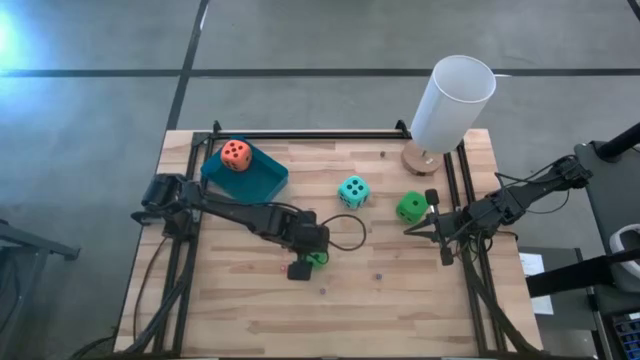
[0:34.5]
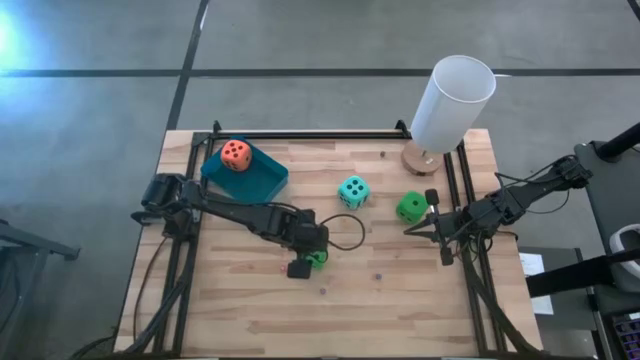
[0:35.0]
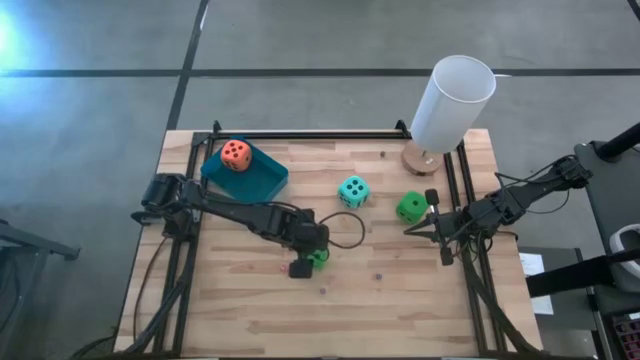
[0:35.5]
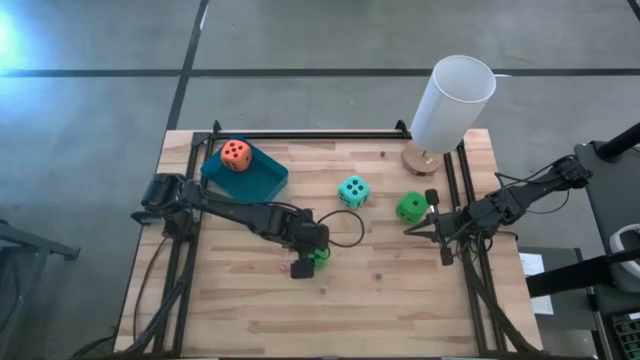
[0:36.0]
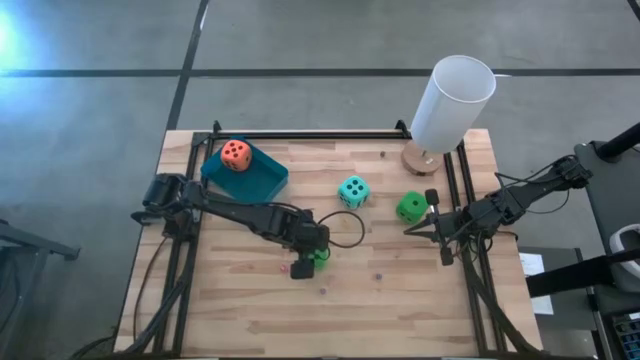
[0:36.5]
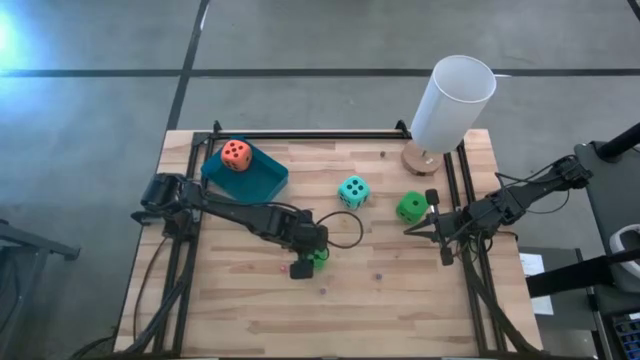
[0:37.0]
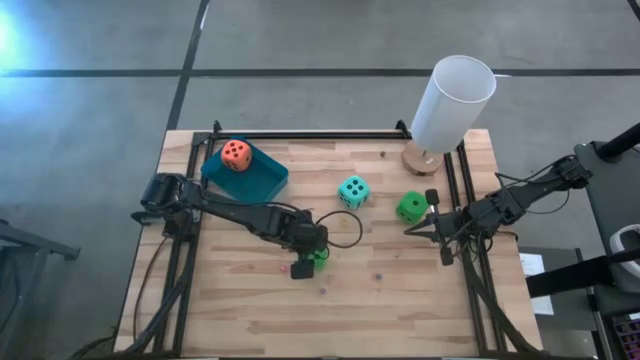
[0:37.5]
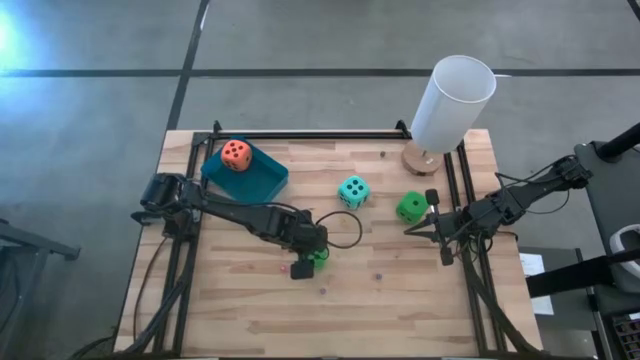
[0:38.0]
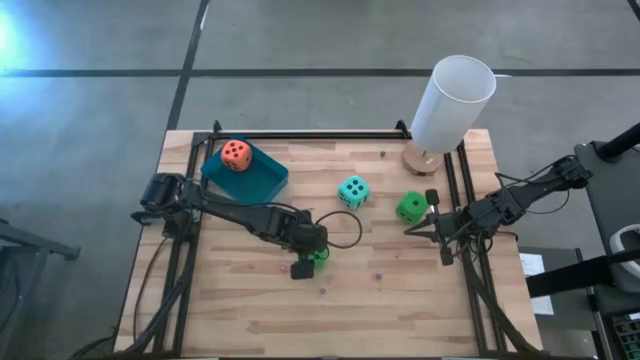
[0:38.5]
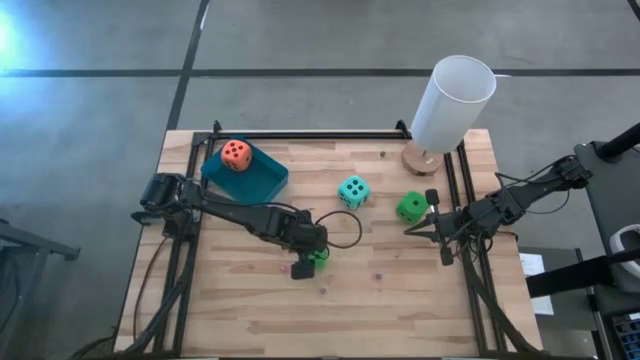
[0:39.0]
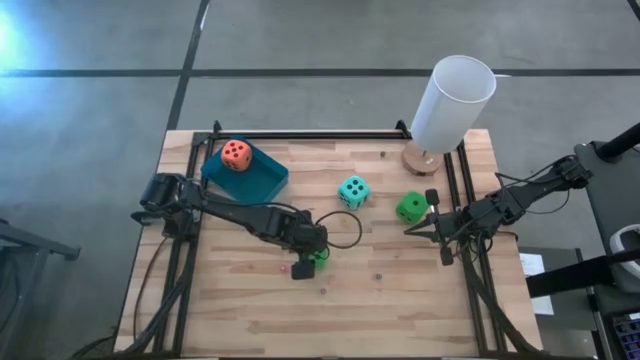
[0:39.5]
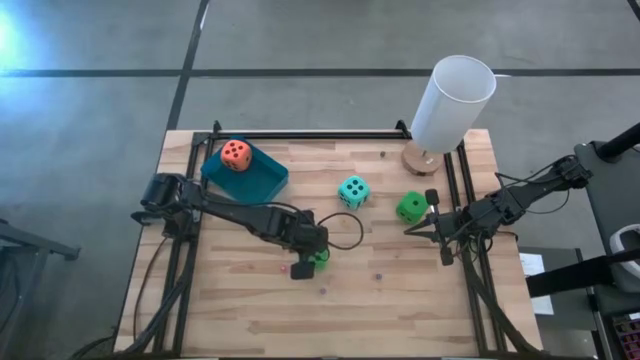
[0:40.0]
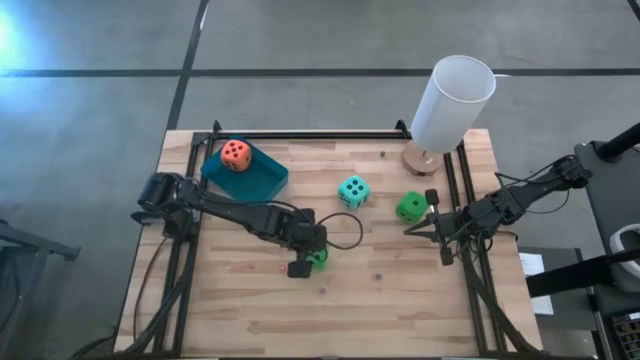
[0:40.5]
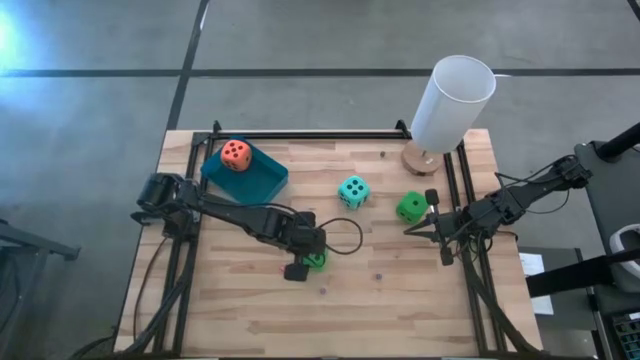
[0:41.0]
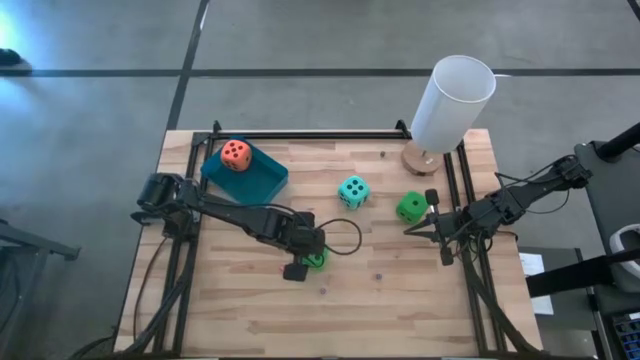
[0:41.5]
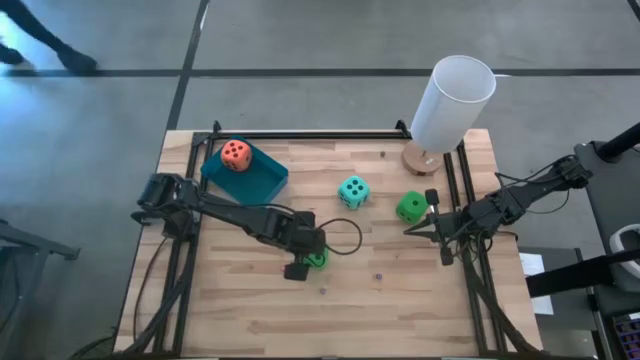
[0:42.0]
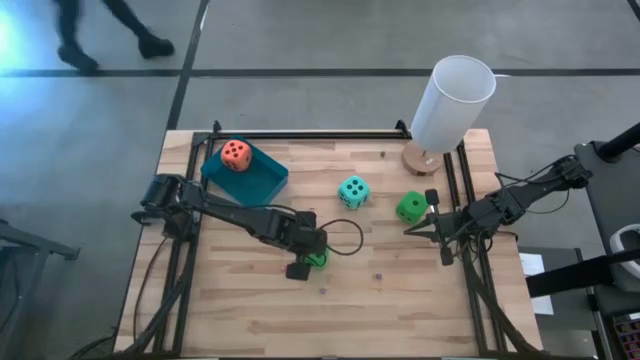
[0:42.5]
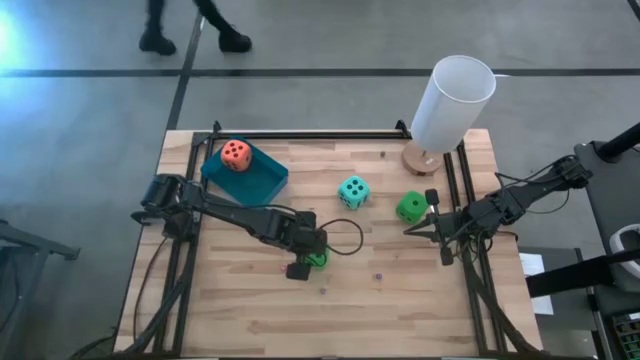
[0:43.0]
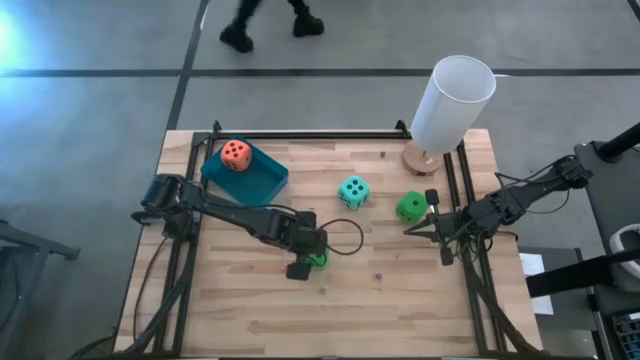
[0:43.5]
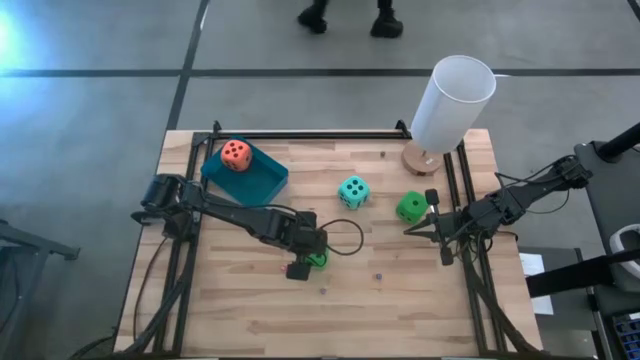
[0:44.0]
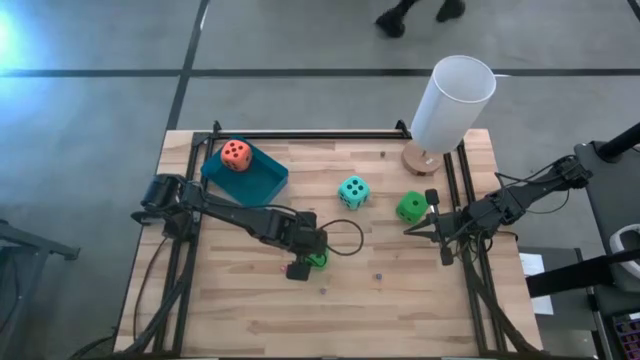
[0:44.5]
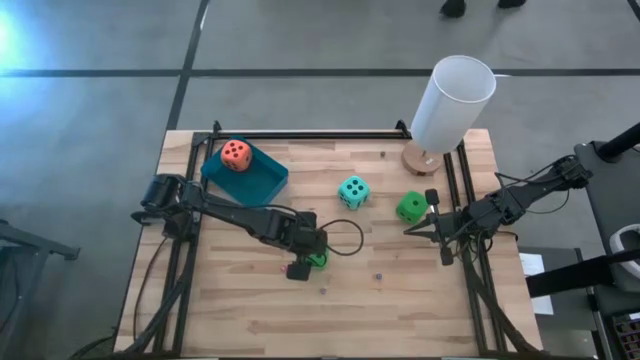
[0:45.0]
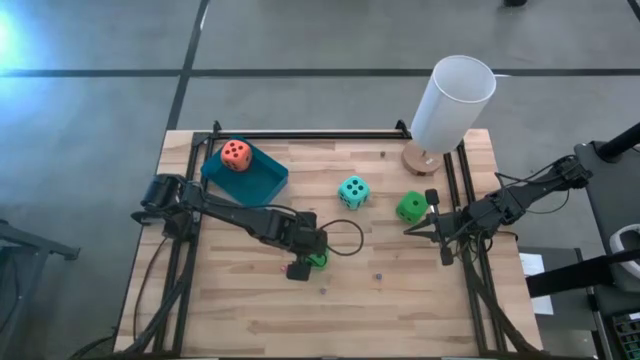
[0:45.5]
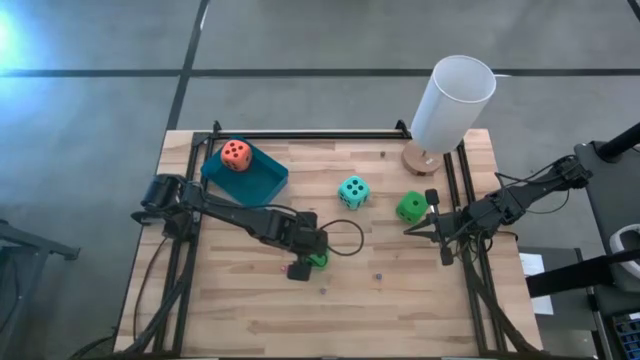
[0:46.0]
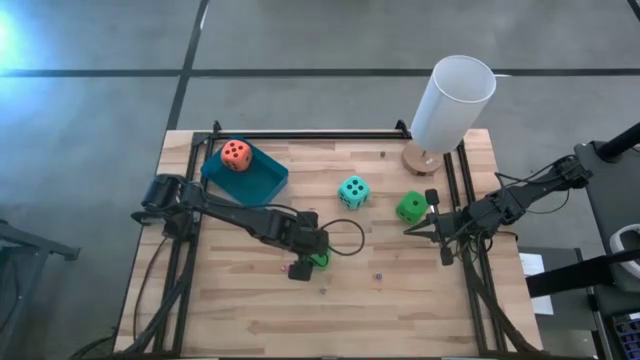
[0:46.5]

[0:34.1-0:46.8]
Task: Pick & Place Dice
Put the big green dice on the left into the blue bin

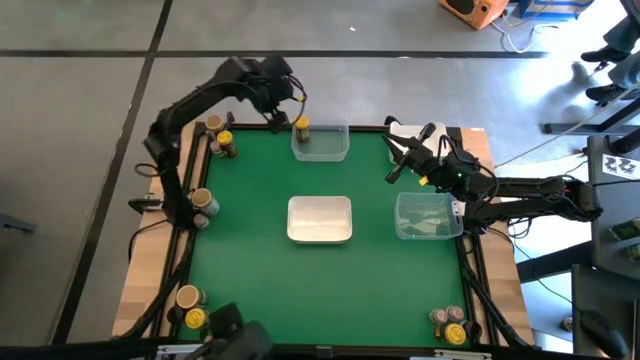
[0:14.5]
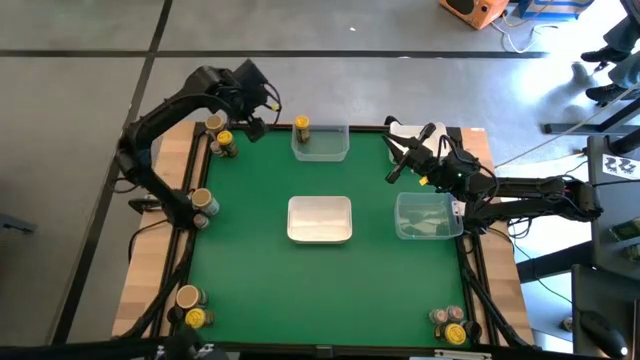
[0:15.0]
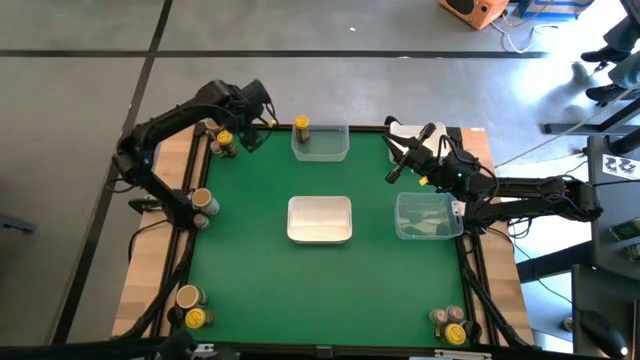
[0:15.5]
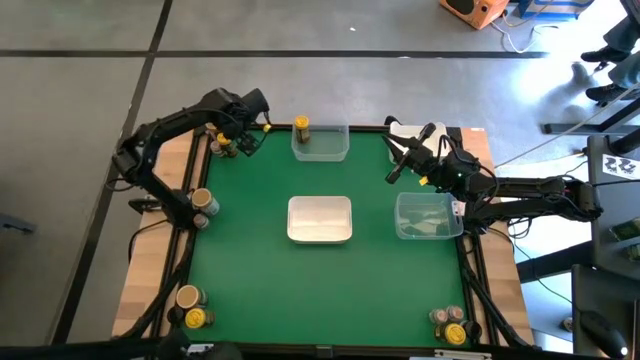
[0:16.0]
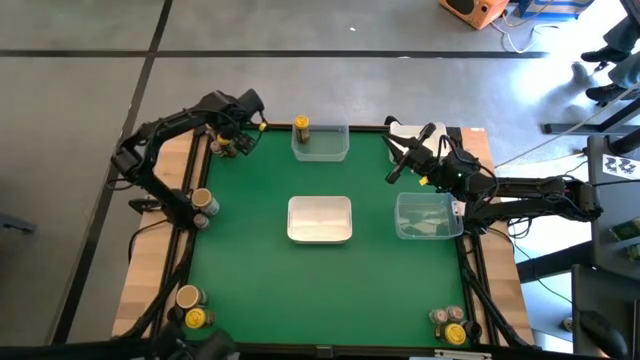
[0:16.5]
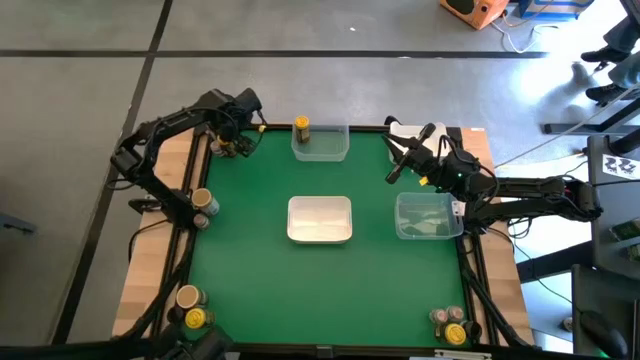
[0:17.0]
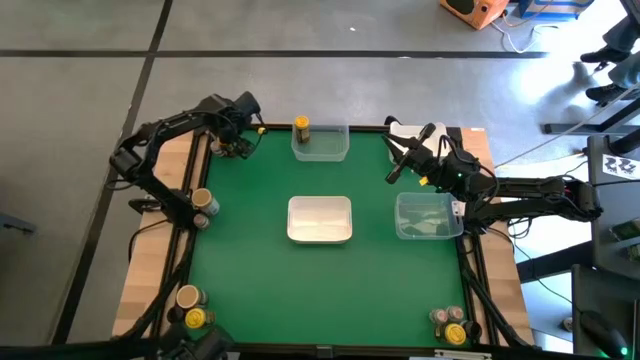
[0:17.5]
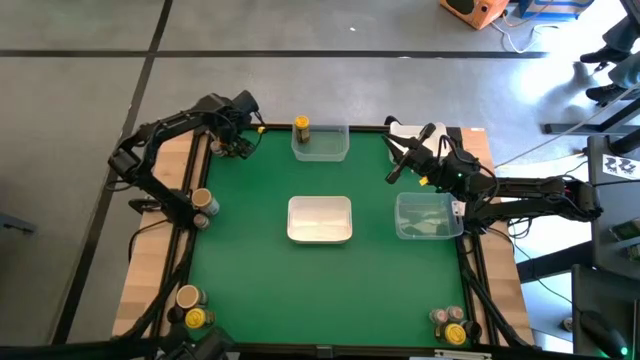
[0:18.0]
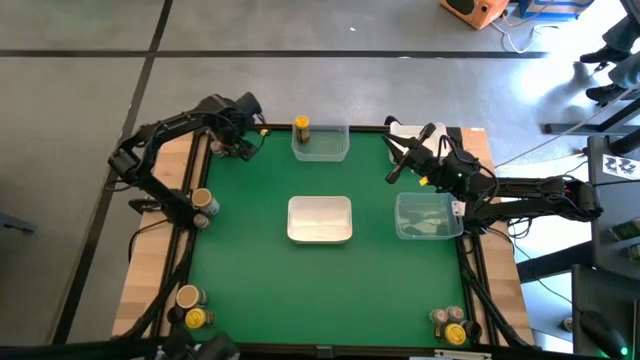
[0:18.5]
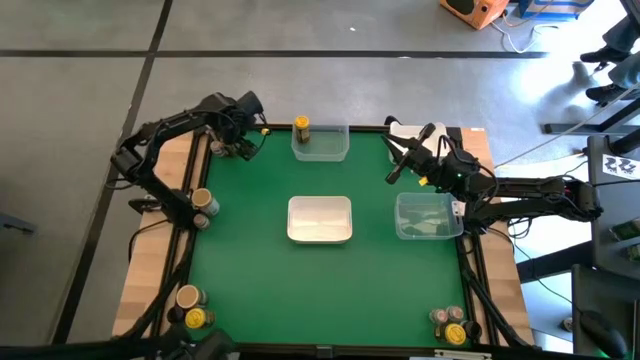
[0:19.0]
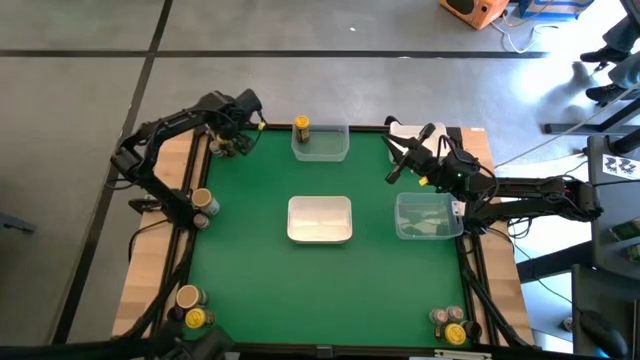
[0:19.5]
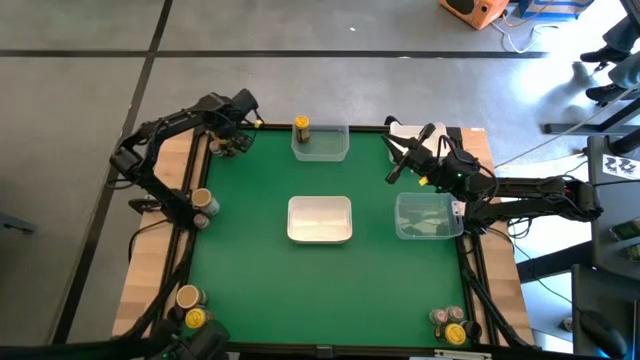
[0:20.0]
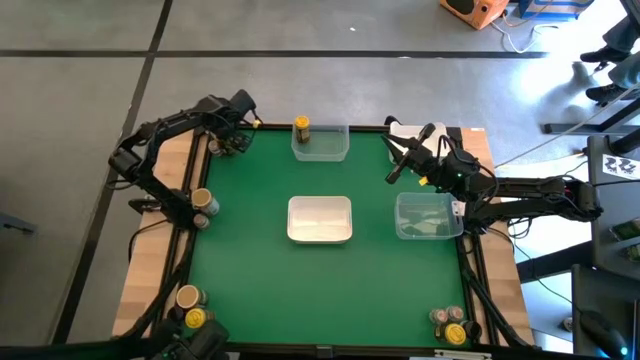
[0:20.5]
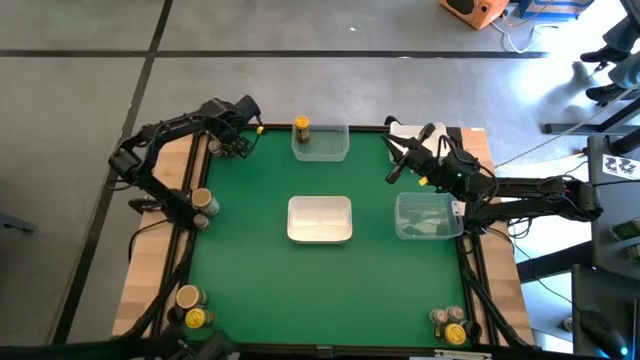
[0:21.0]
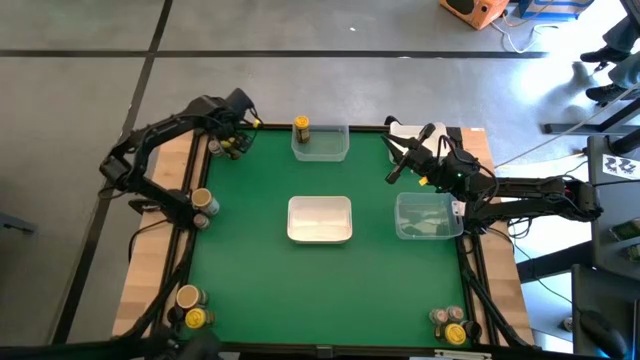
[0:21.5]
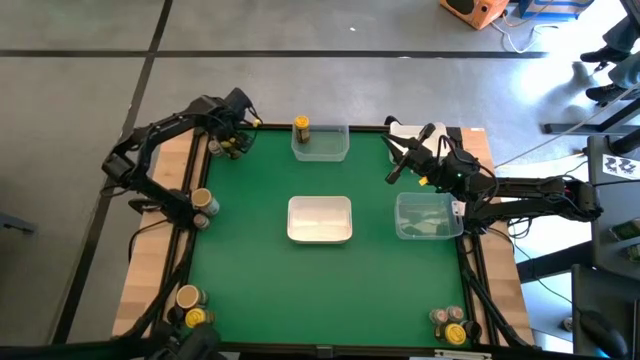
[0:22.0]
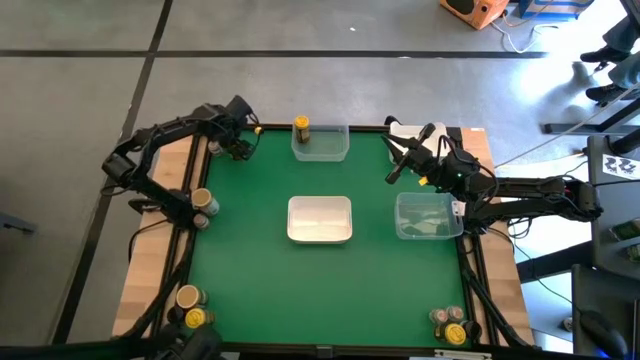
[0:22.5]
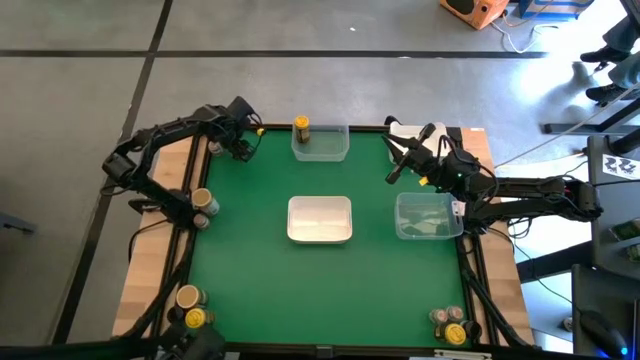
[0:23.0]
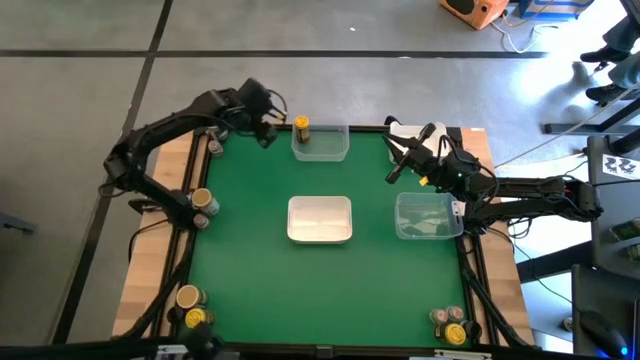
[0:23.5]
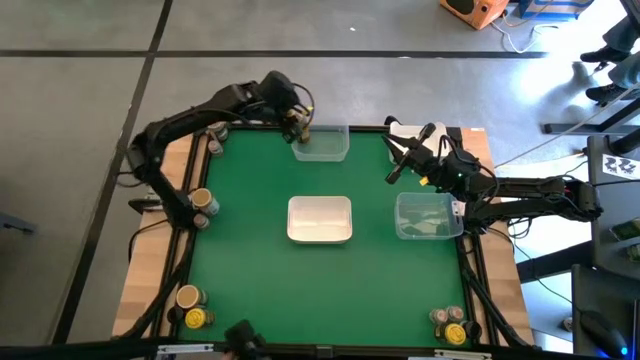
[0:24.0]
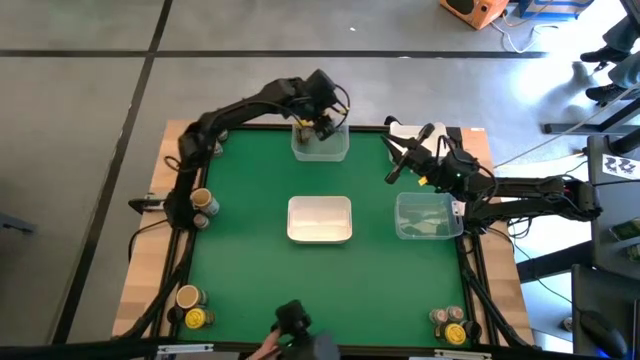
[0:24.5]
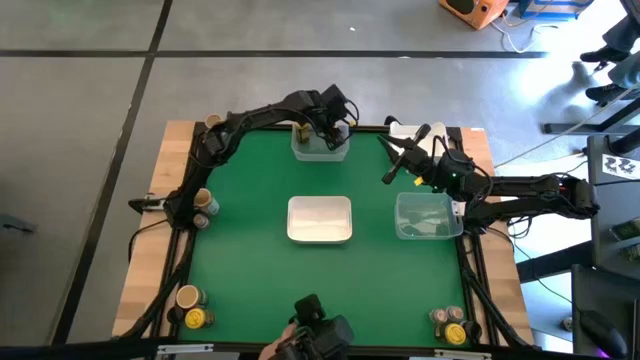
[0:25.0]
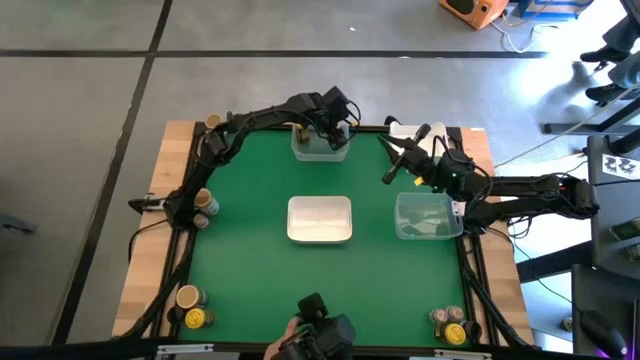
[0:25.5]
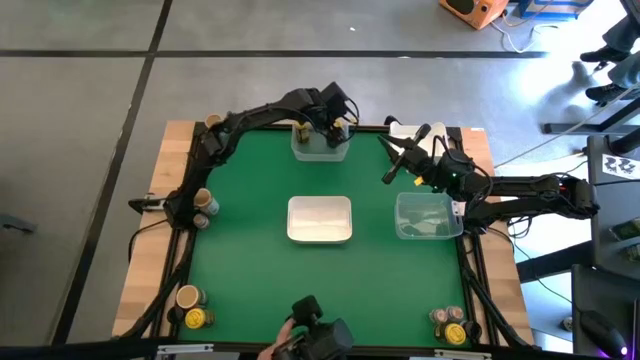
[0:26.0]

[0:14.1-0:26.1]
Task: Sort spices by type
Put the top yellow seasoning bottle into the top transparent bin
